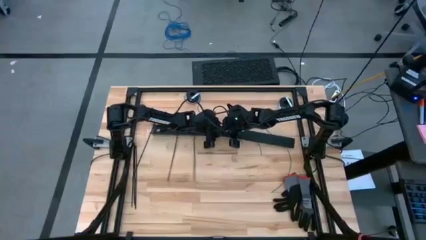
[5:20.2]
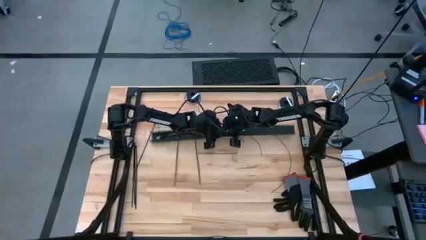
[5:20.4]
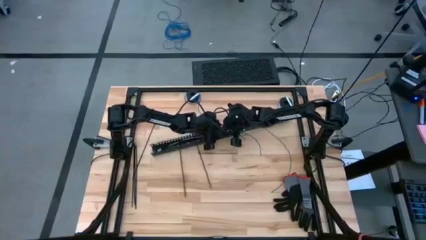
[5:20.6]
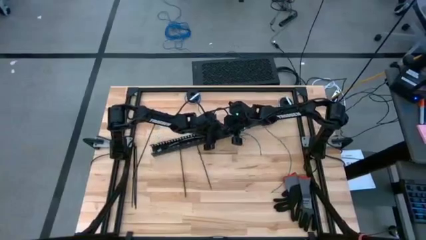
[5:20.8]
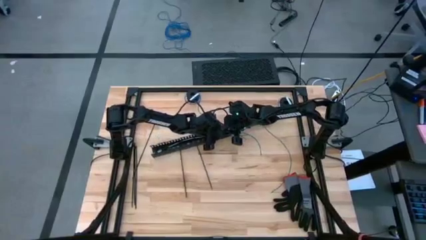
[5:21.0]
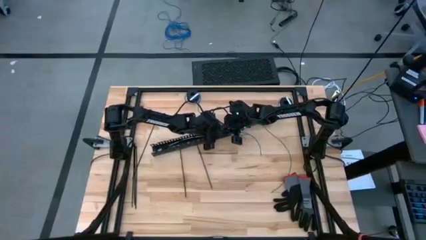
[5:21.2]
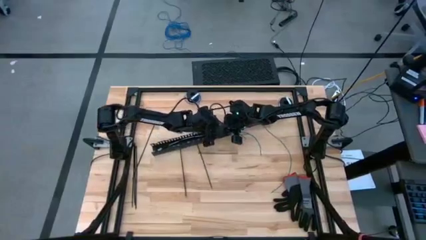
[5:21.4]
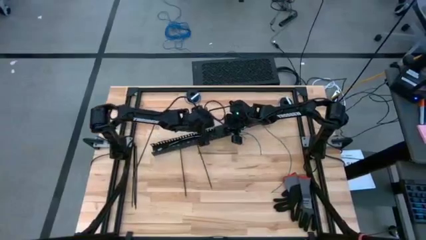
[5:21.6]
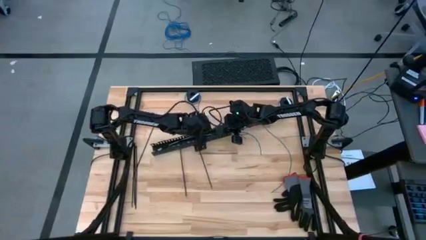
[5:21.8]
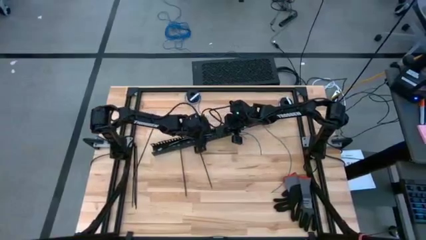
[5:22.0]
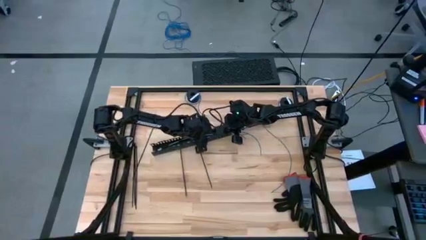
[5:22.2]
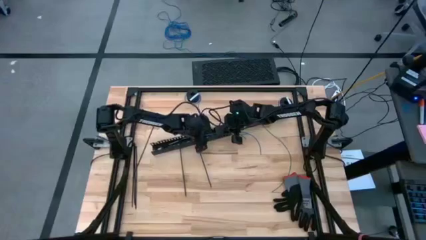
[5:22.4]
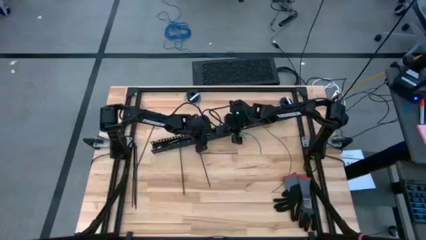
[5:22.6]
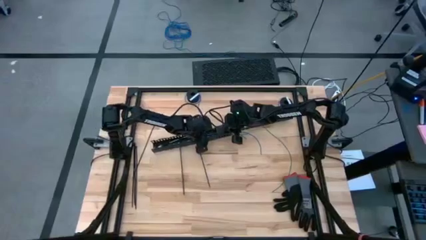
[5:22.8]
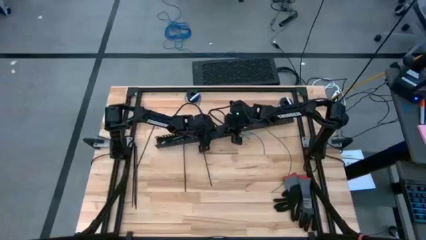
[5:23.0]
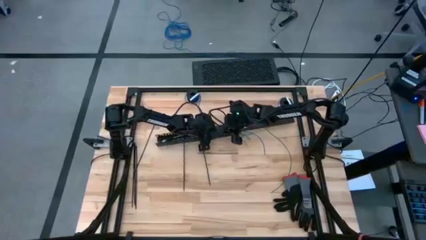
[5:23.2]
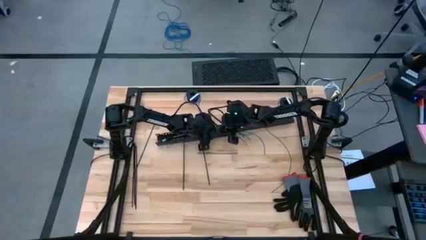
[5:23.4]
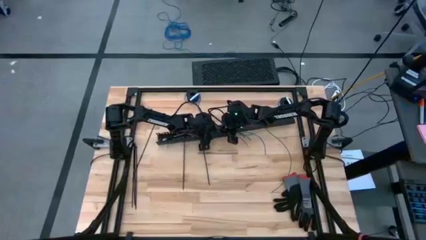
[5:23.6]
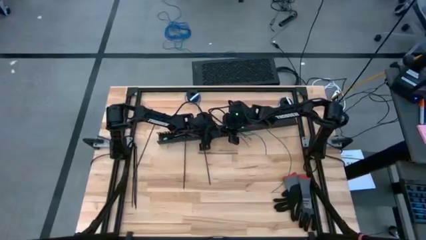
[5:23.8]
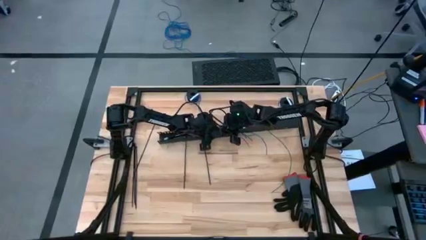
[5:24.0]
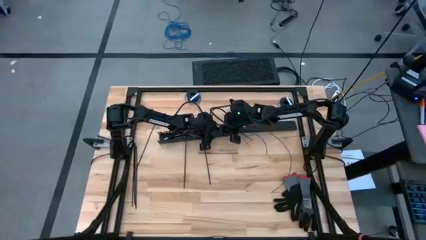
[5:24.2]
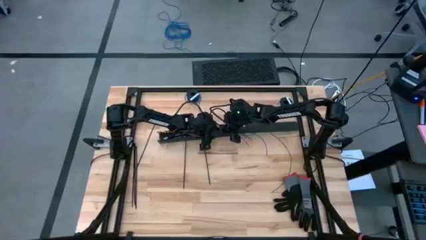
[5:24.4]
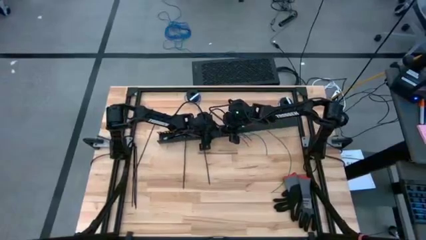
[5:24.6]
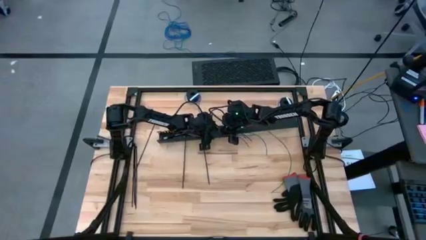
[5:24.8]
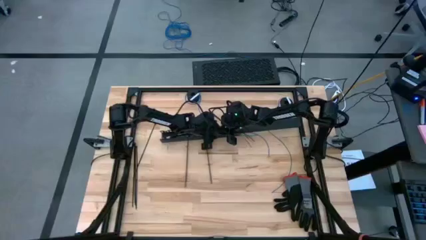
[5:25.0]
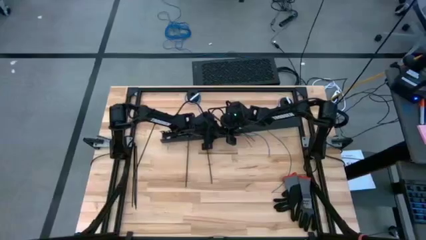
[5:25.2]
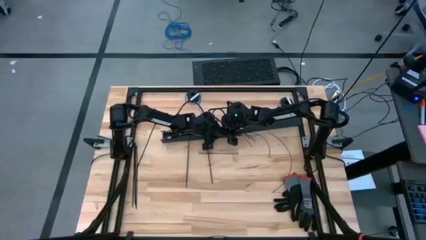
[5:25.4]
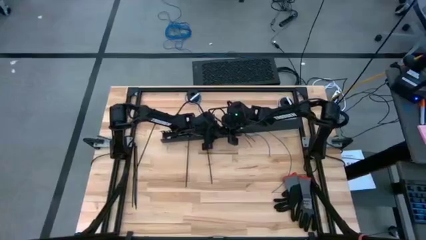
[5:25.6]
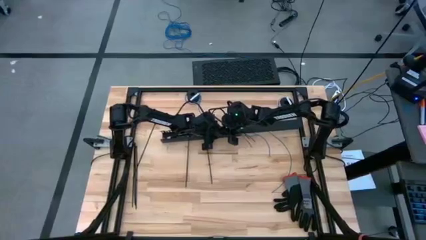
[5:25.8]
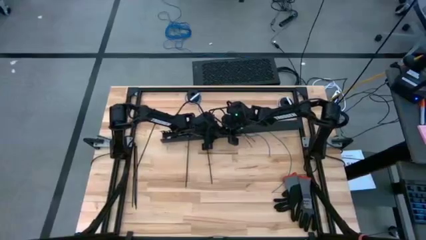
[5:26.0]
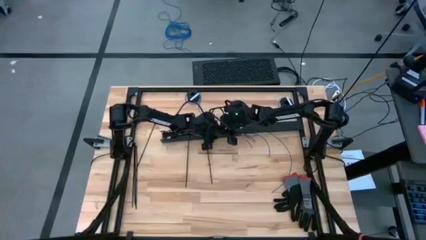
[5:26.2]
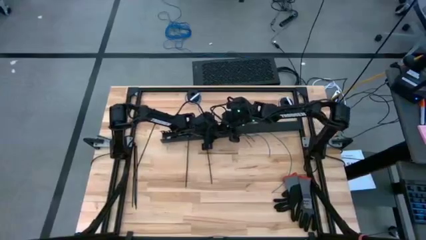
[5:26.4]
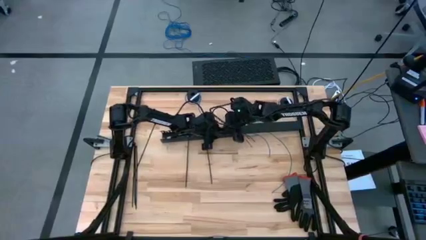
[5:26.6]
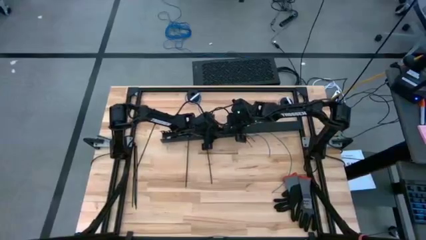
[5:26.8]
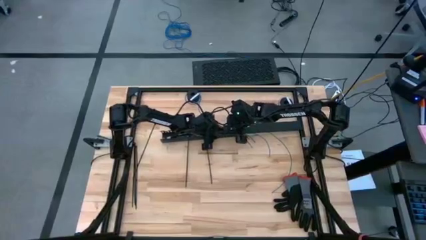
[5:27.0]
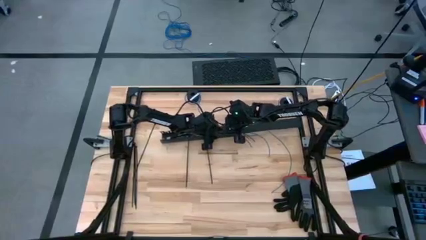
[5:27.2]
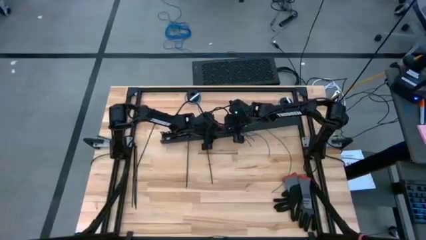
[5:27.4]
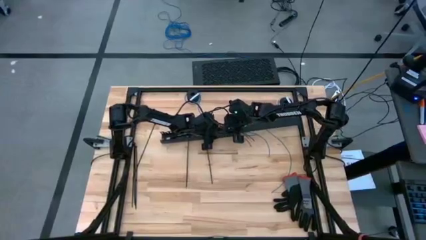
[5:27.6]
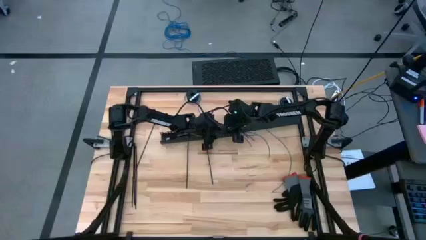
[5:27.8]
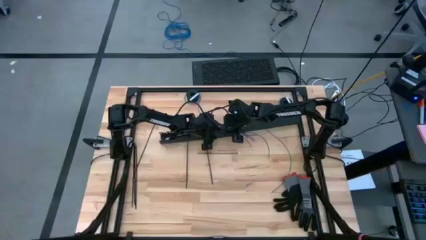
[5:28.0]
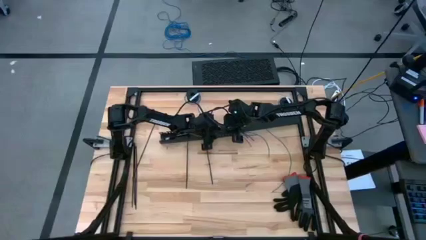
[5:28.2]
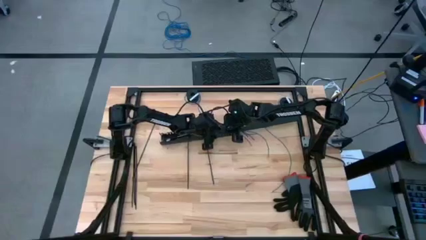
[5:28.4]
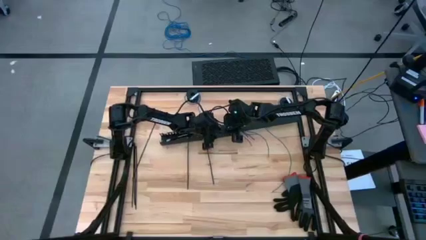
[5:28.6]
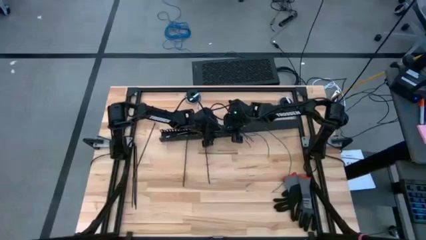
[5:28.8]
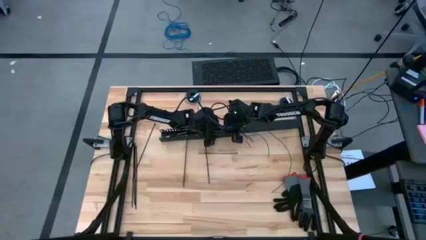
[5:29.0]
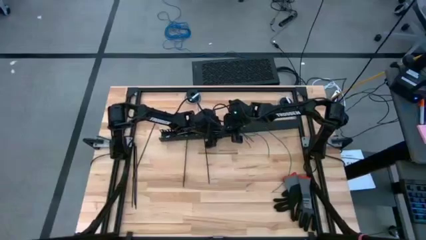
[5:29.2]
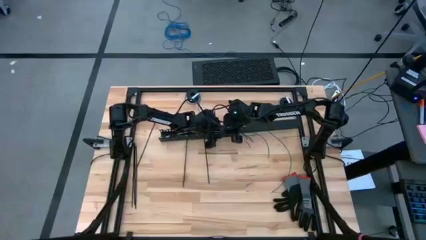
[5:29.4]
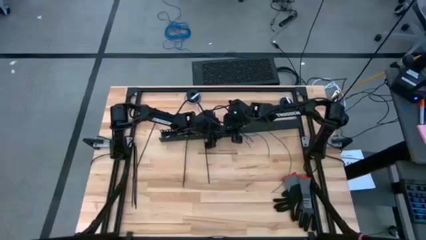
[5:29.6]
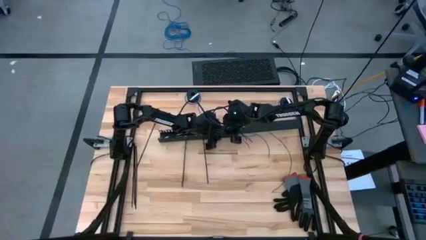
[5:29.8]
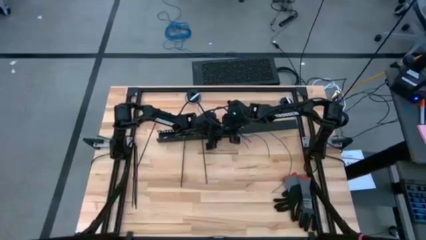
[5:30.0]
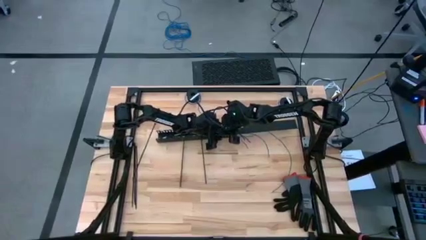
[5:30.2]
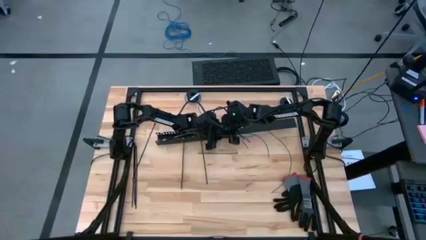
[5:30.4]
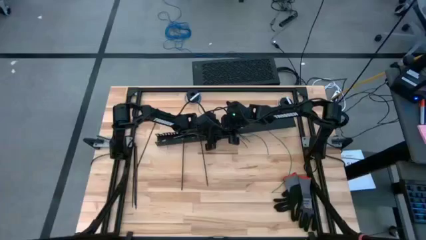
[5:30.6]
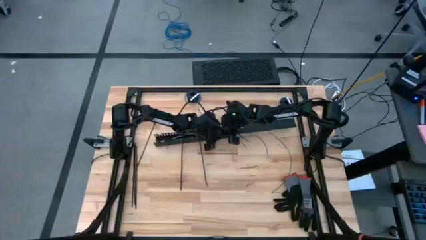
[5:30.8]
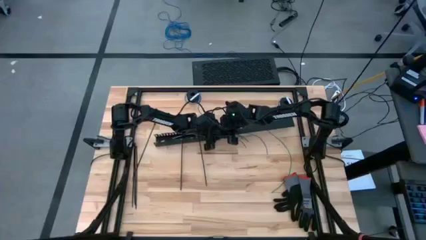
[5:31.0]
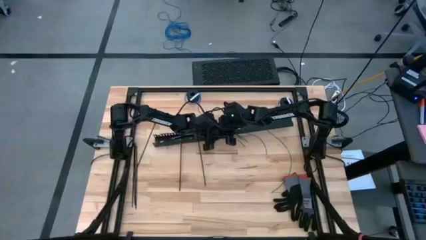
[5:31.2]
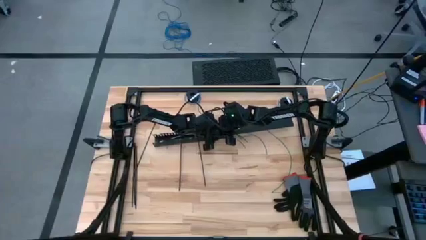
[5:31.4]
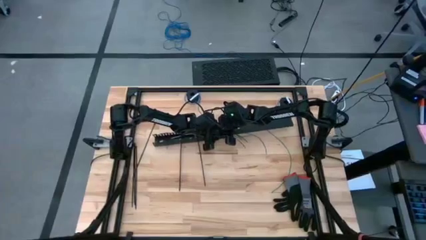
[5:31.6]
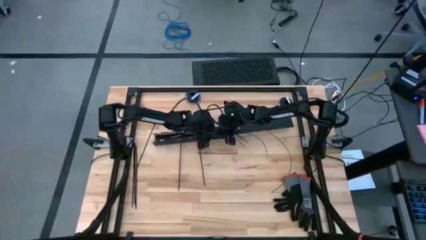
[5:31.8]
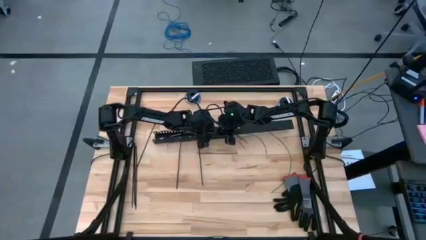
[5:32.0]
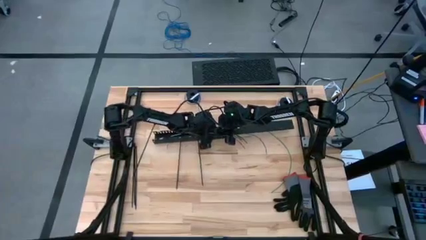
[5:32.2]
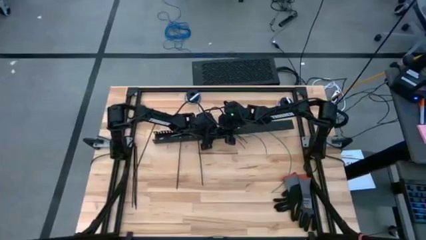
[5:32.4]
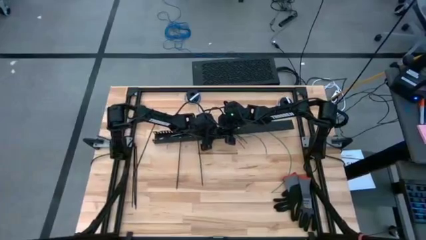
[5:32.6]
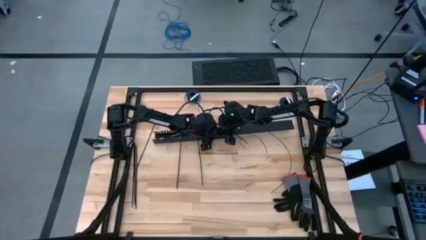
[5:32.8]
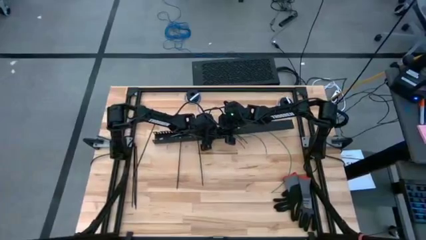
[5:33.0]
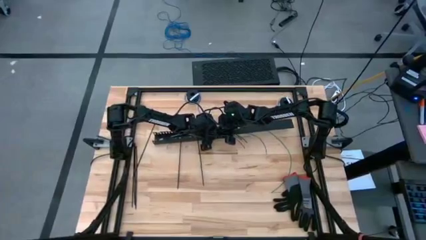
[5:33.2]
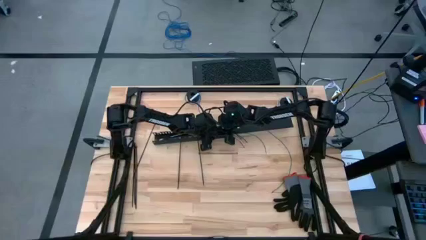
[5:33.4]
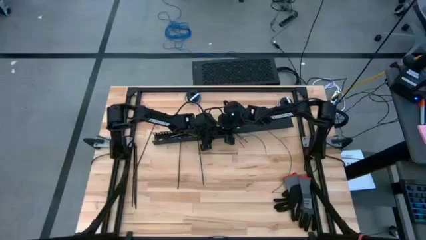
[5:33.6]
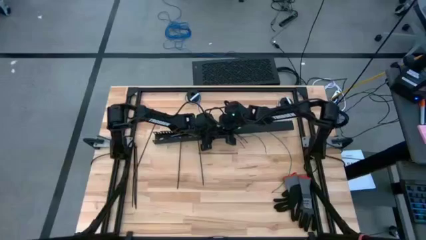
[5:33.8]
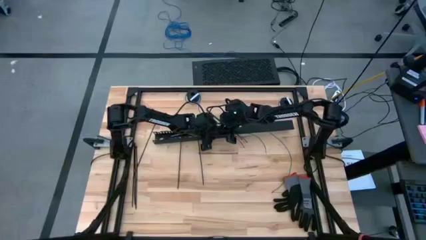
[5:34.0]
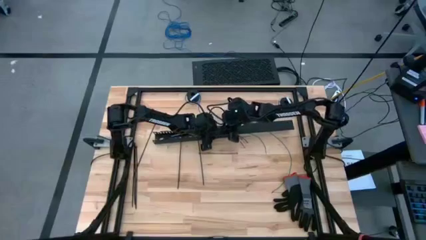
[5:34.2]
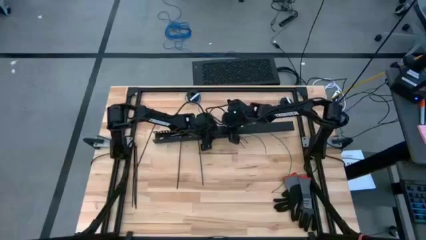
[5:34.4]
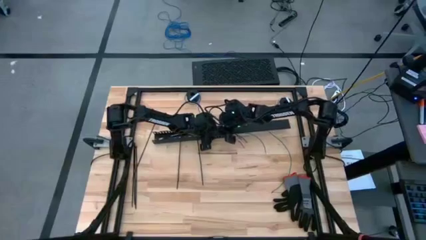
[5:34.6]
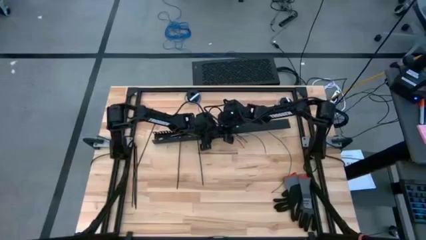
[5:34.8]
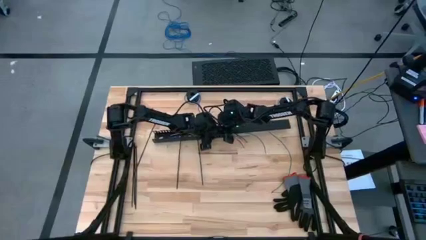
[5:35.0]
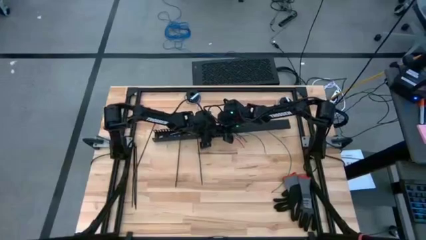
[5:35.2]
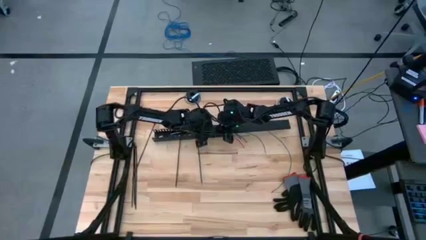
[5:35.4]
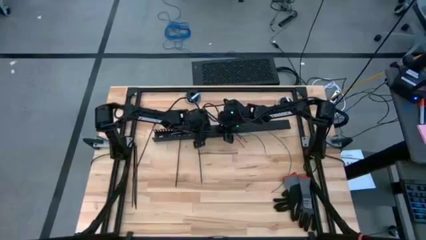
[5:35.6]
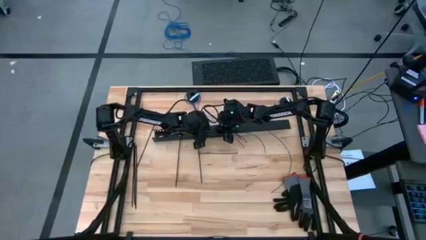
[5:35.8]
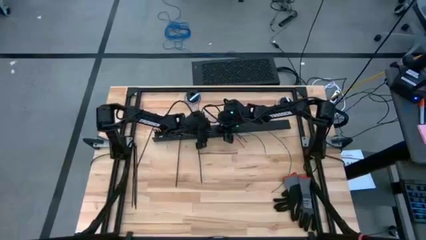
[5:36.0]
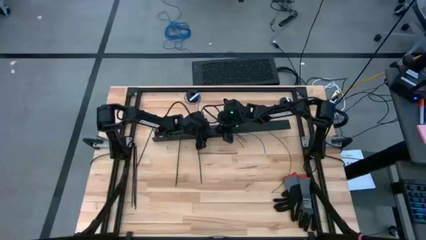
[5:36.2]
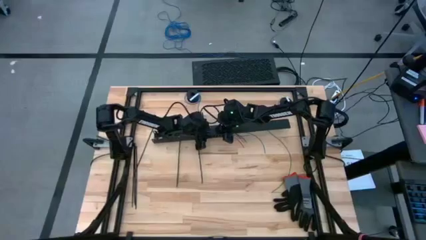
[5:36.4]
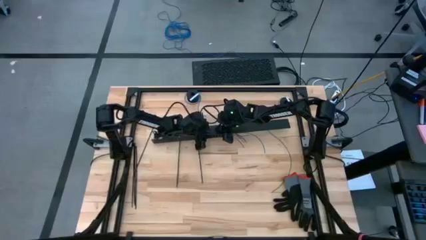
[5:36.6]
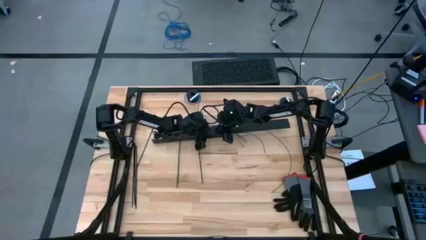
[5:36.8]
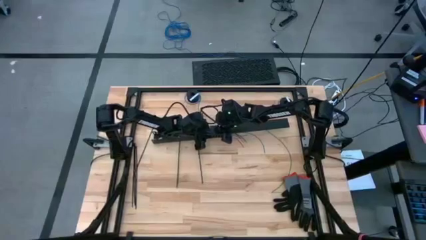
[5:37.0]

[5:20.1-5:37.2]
Task: Ziptie cables
Close the black cable duct
